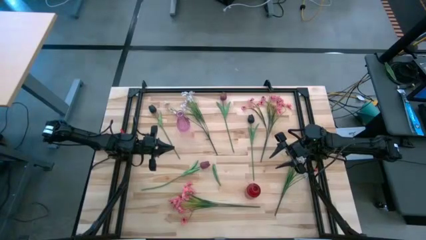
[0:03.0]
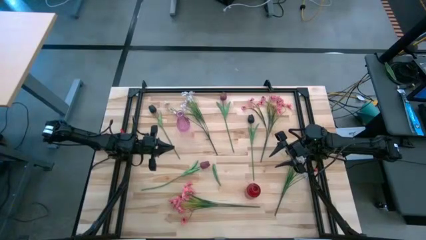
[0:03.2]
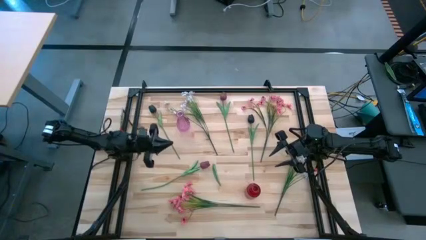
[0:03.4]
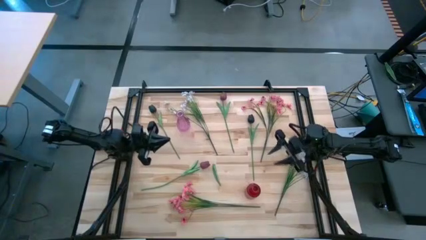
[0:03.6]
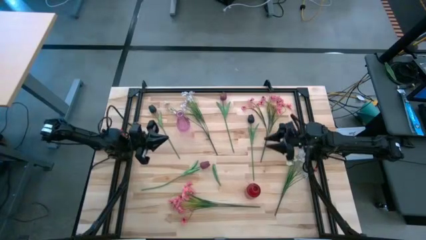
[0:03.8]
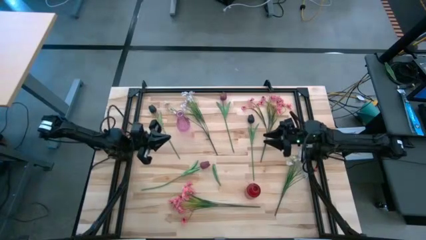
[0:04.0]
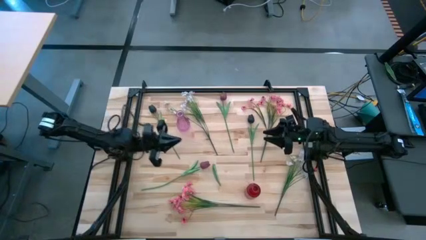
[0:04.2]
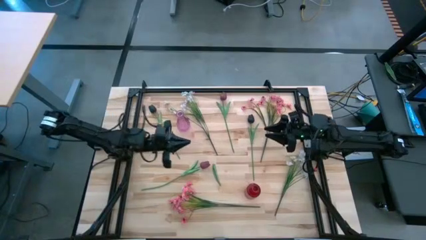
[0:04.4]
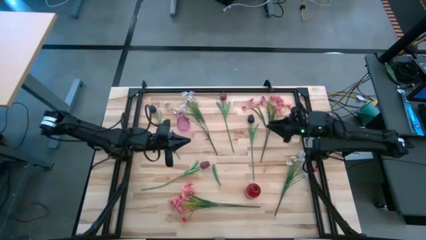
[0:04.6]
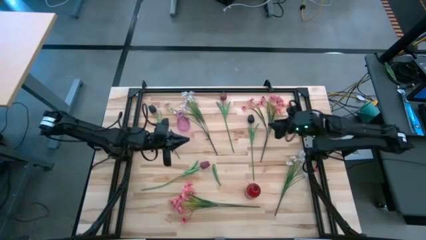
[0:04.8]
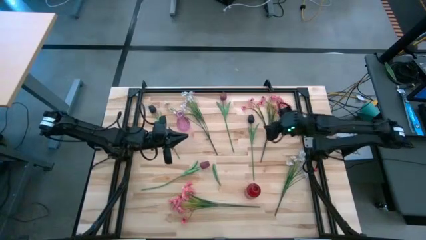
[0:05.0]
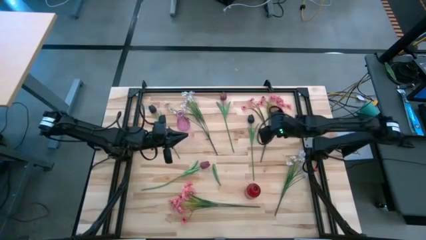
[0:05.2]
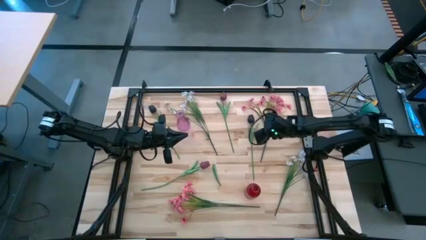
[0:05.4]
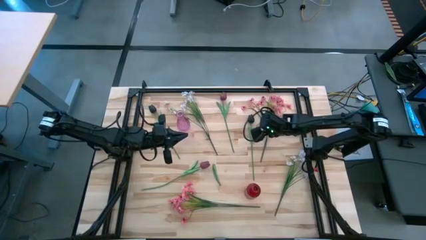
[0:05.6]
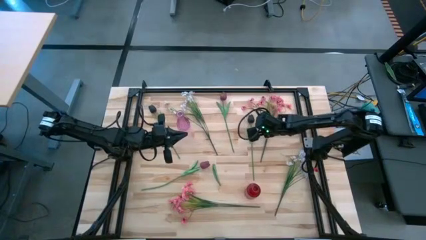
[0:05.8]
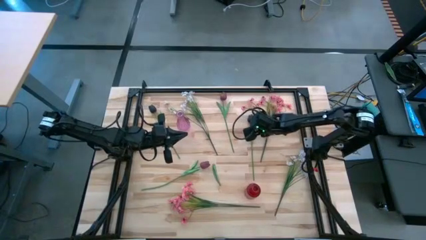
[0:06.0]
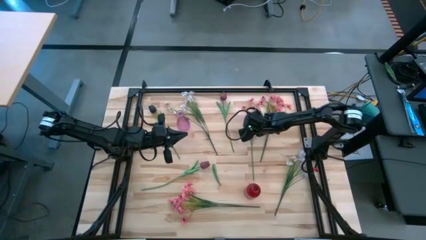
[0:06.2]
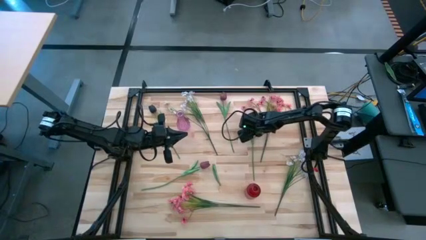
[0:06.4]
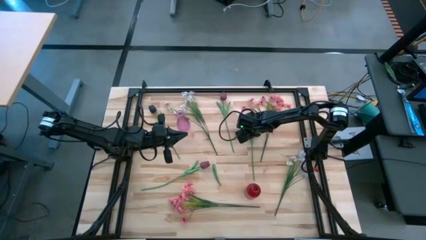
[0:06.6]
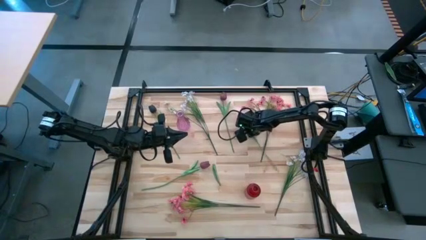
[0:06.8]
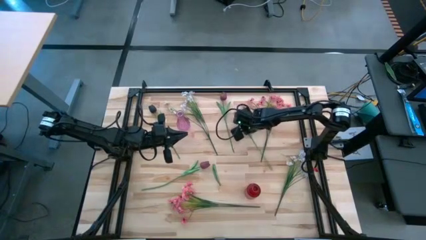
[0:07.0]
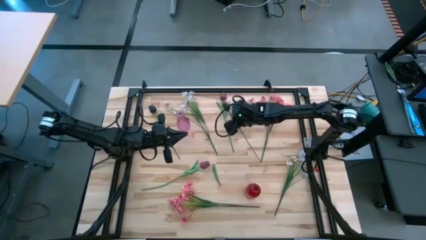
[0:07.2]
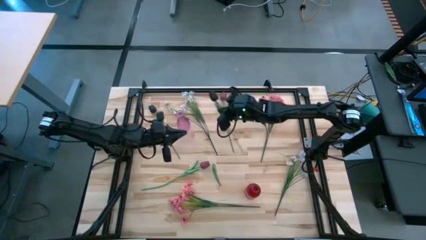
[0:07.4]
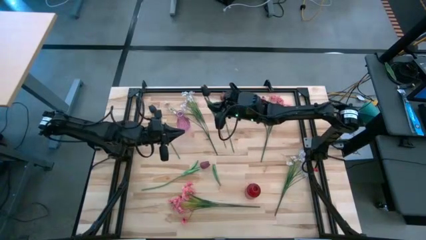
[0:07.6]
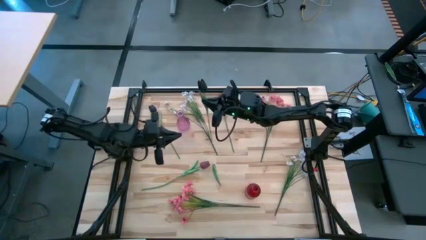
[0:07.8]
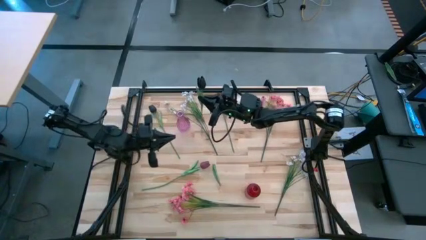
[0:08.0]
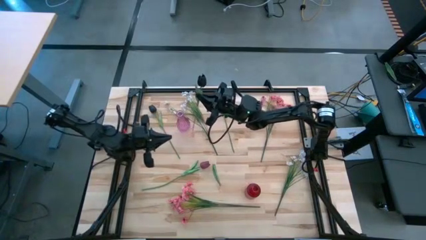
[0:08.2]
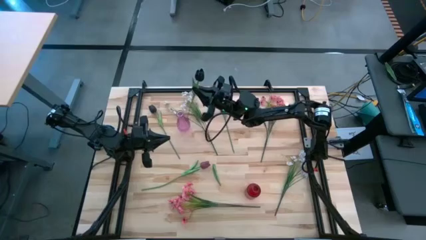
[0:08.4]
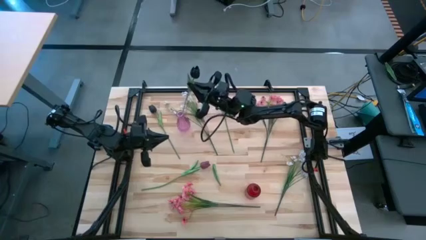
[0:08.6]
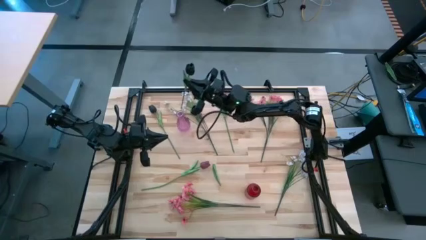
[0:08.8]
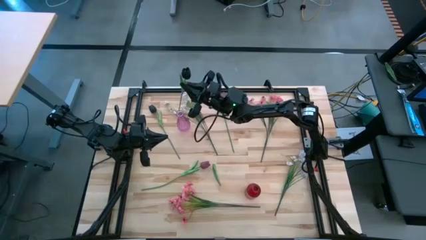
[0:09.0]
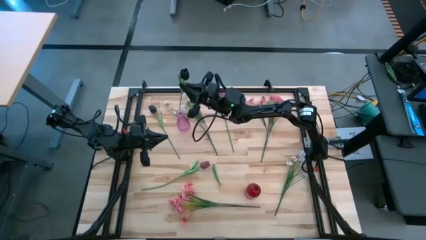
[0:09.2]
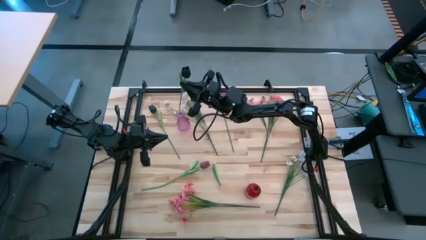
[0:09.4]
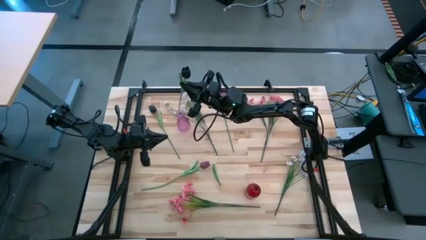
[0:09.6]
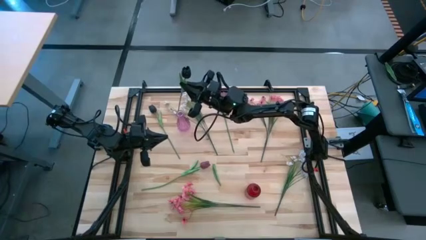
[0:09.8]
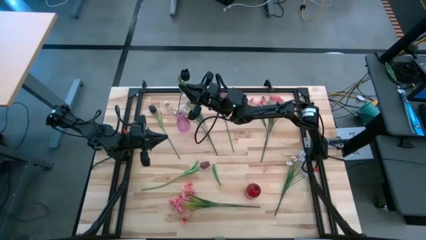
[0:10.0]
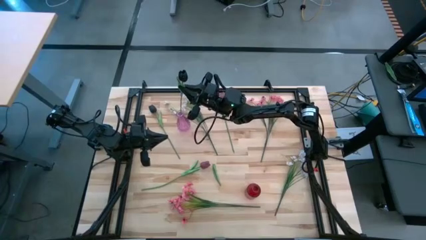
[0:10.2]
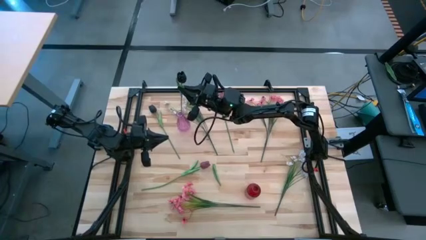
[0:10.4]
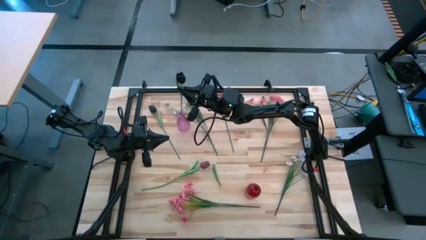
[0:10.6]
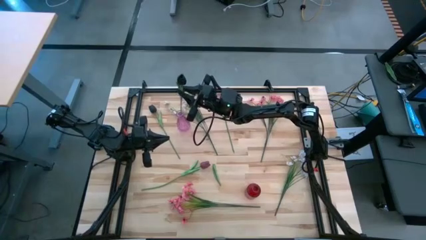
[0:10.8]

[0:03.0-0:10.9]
Task: Sort flowers into vase by color
Put the right black flower into the purple vase

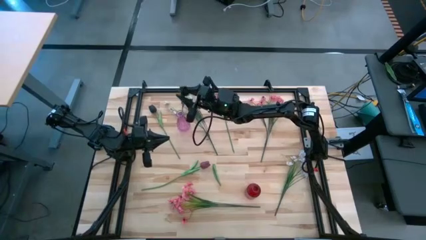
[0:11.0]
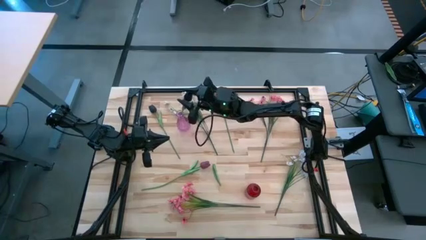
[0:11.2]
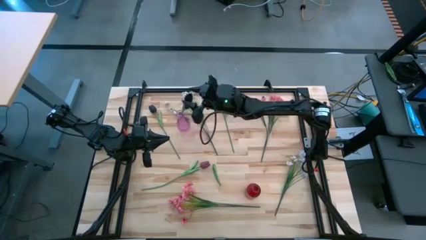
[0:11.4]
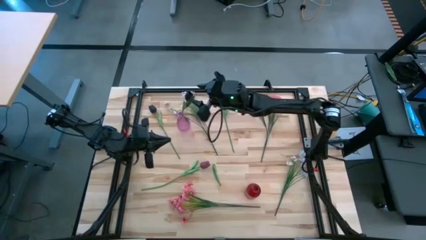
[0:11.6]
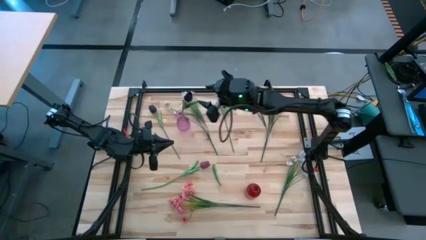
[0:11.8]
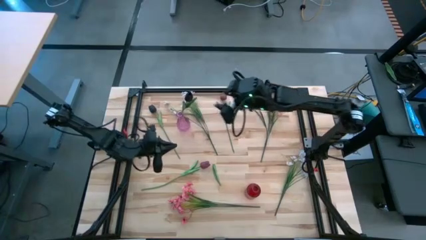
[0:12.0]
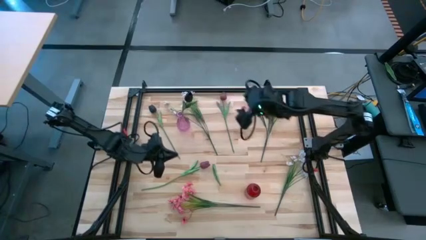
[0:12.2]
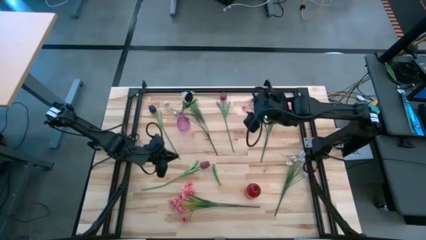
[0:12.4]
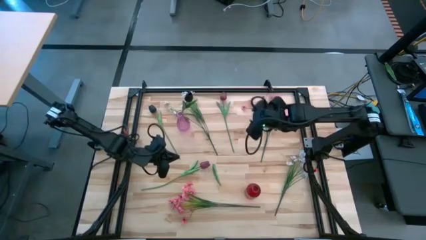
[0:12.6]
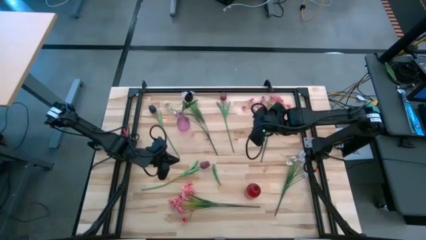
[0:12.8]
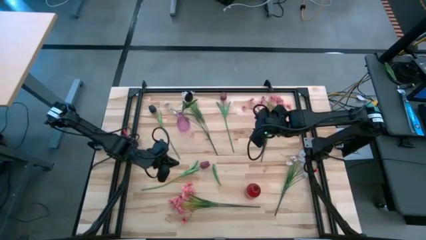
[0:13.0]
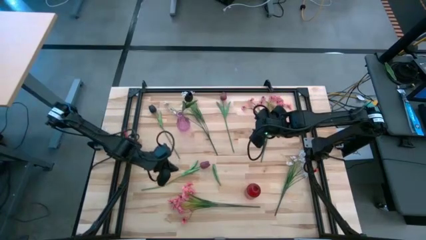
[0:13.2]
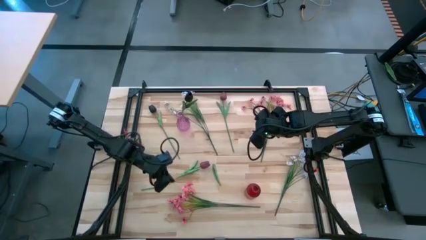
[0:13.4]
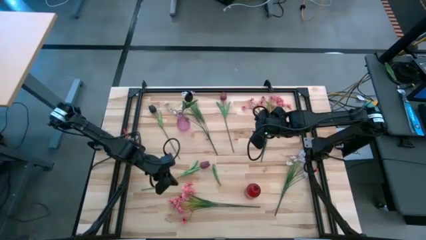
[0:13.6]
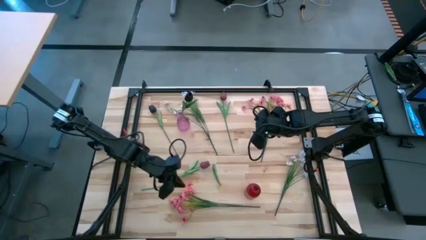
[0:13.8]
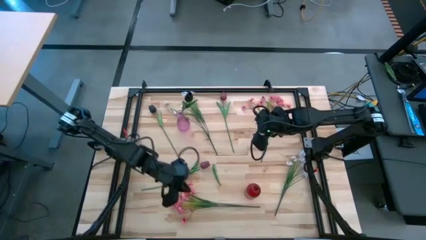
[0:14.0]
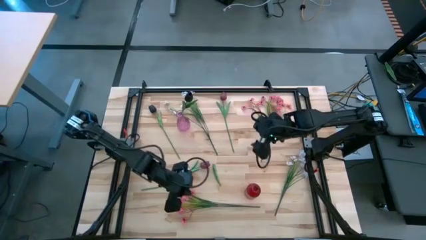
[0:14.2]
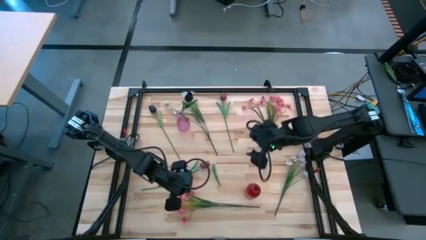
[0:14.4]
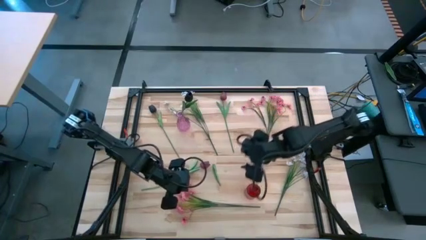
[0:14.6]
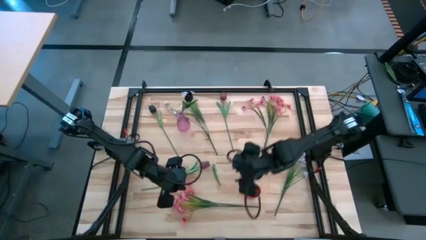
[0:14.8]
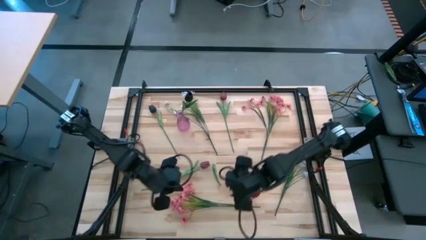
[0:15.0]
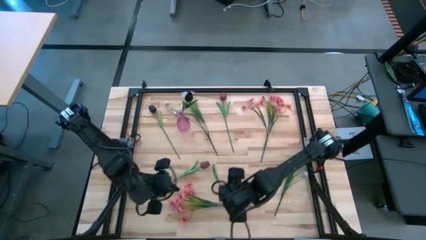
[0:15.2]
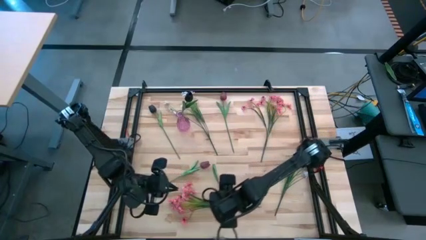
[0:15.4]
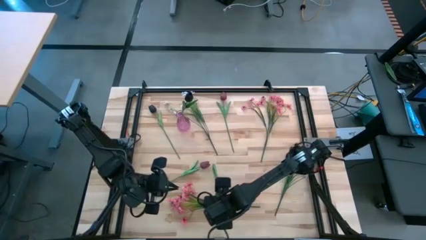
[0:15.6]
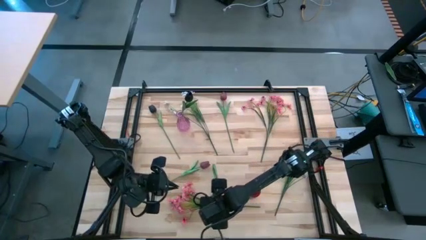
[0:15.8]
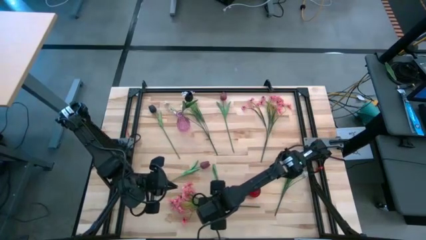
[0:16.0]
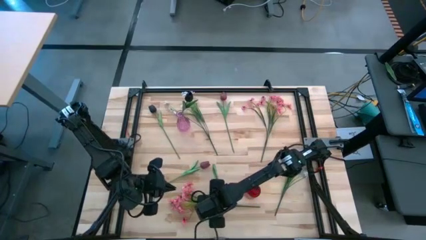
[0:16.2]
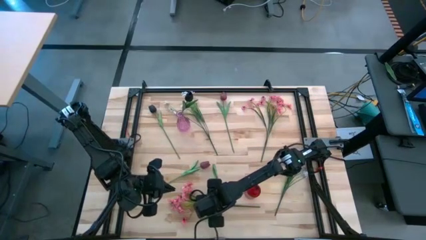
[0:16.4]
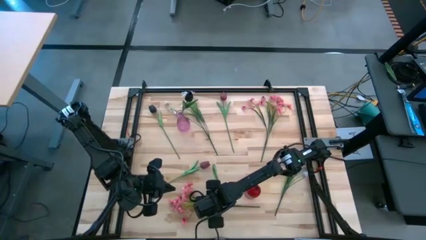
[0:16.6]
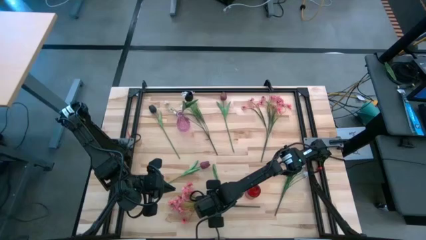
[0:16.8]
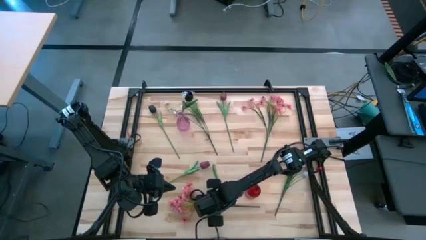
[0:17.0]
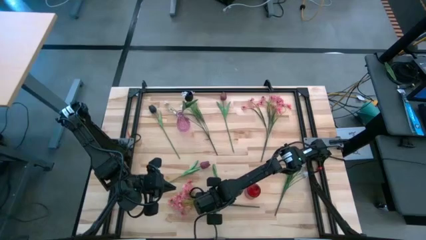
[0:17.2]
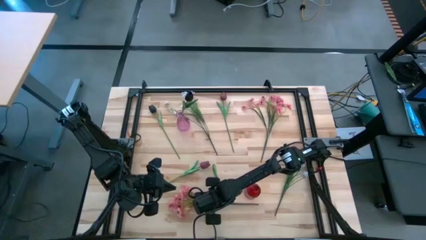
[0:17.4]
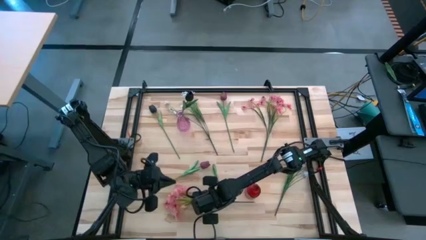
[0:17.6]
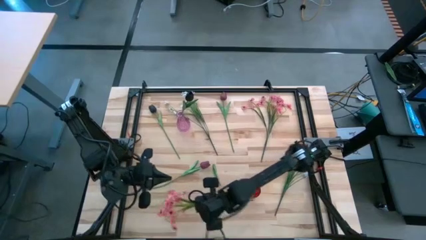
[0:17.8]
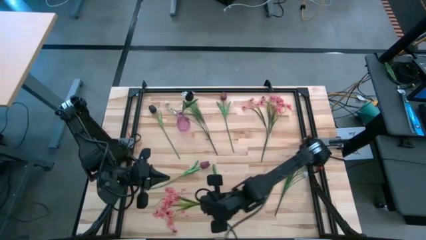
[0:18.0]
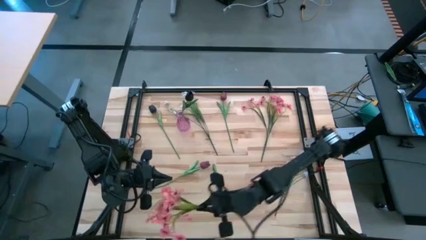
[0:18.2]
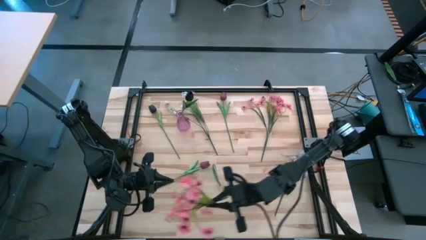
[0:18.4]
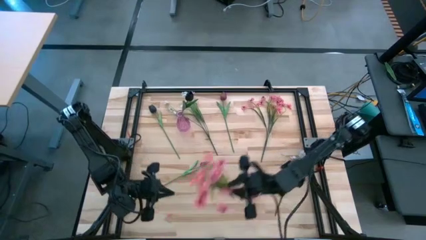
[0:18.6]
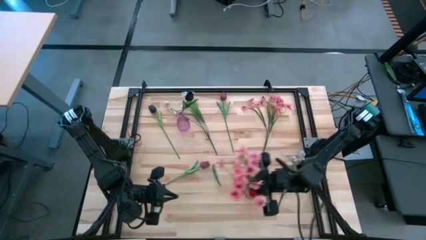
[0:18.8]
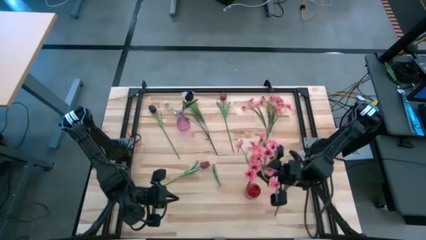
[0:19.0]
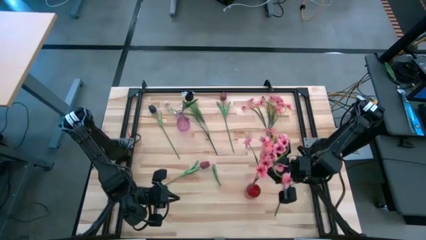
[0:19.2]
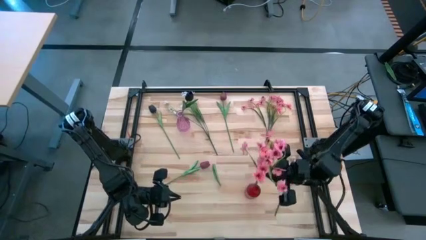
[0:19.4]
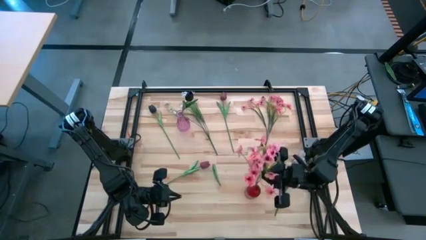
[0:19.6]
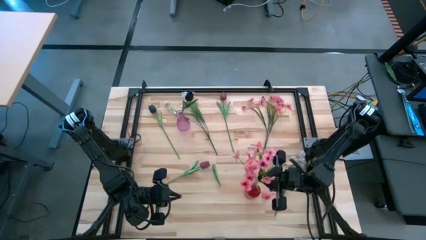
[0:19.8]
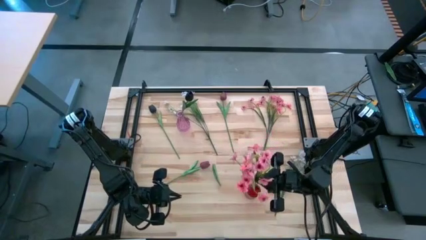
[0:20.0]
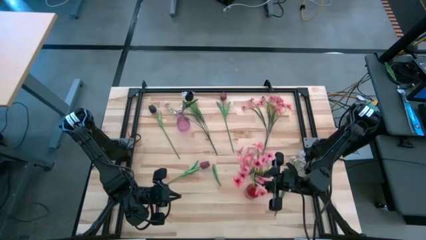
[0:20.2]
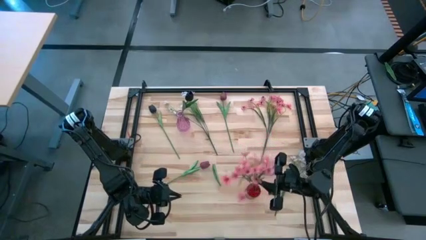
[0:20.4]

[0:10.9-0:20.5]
Put the bottom pink flowers into the red vase
